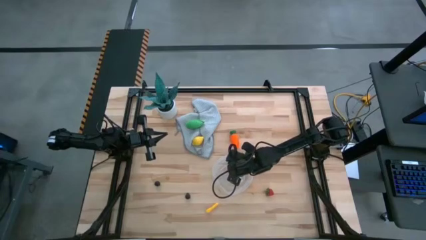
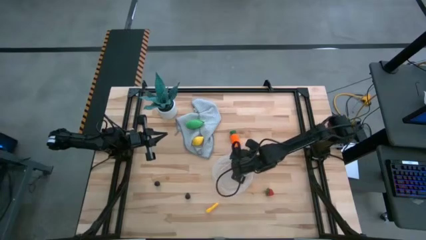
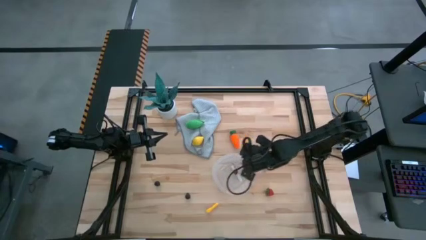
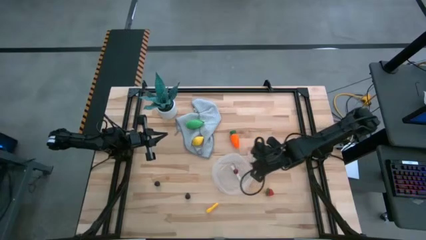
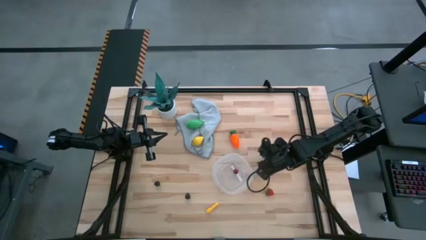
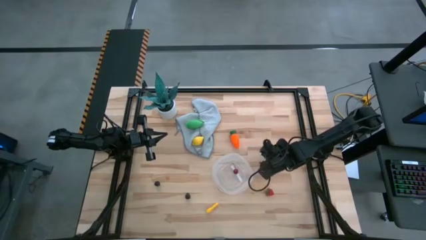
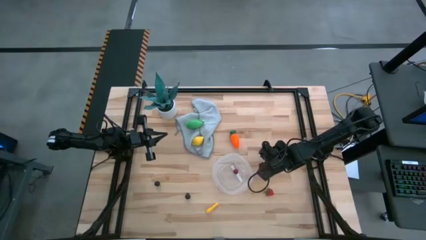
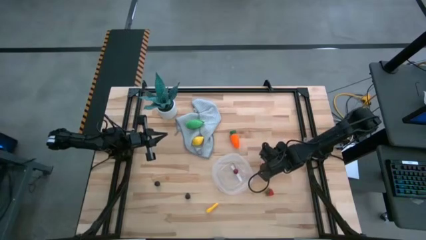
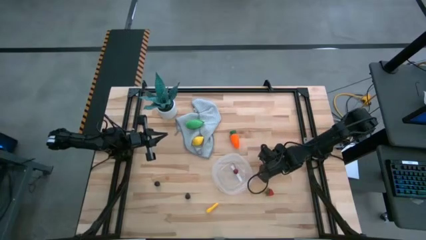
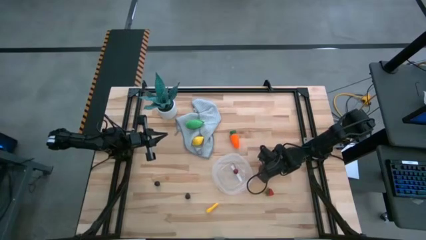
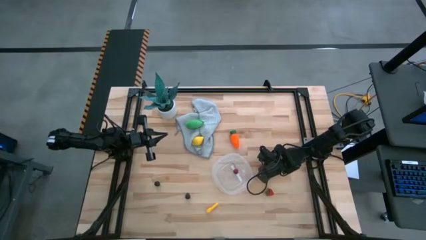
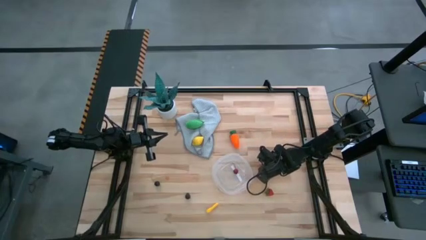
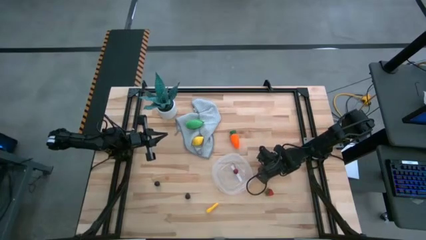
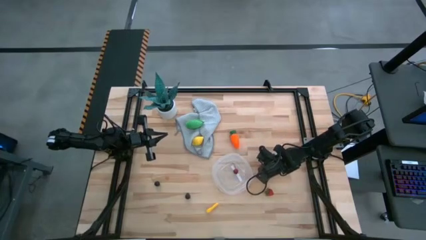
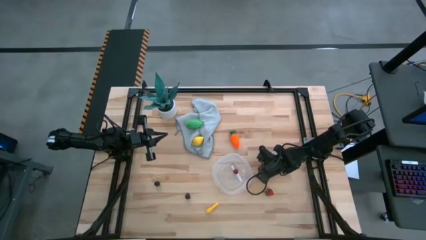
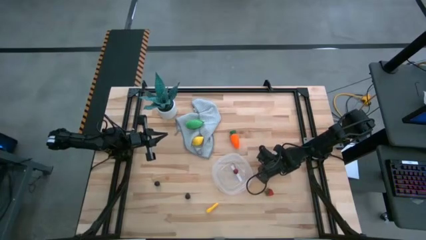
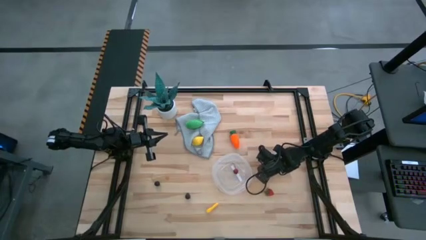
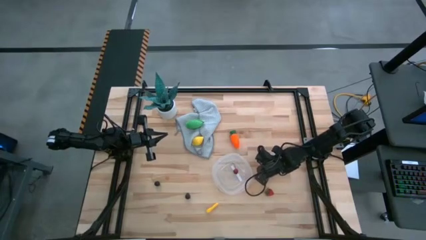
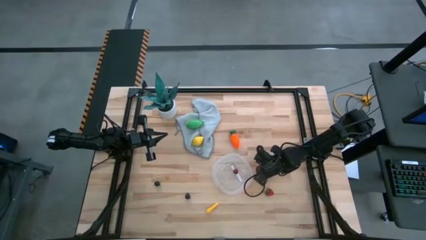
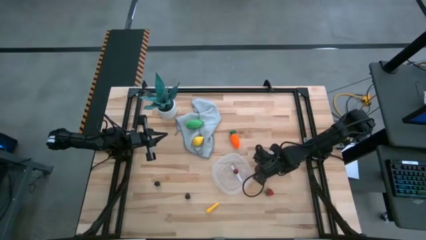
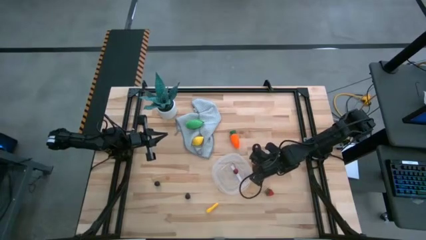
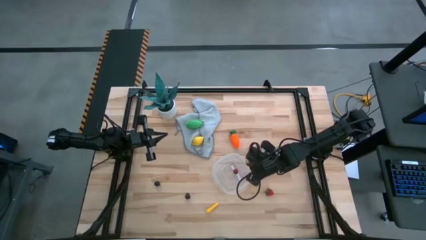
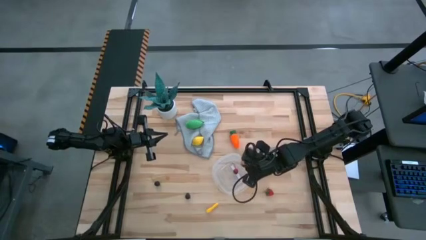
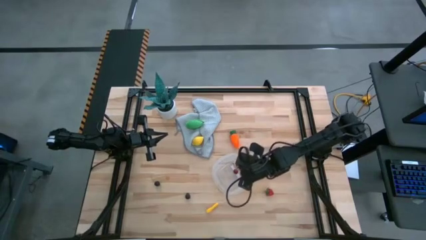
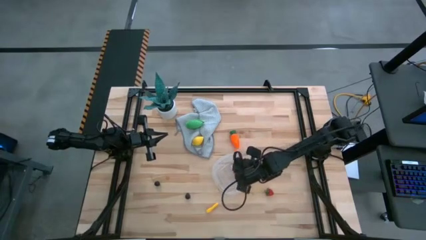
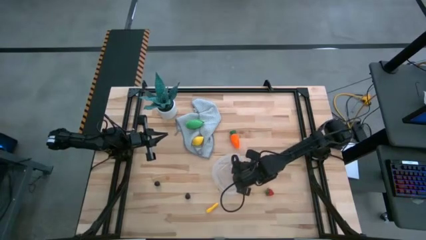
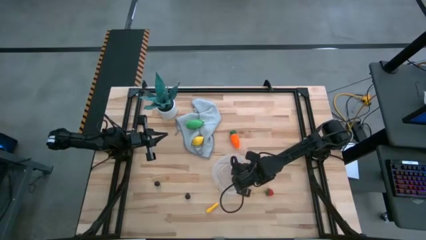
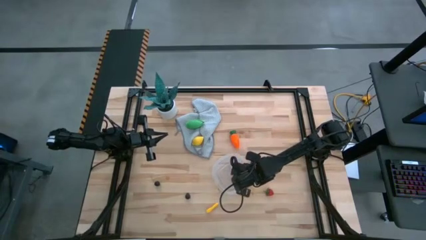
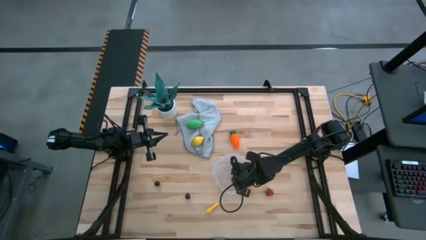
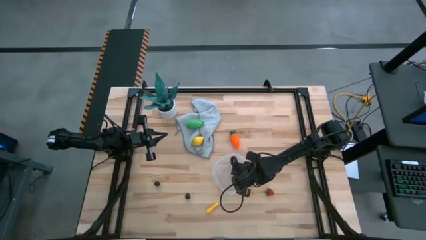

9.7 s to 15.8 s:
Task: Pick and placing Produce into tupperware
Put the peach into the transparent bin

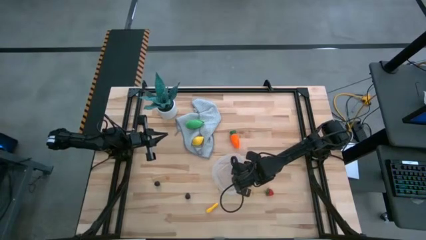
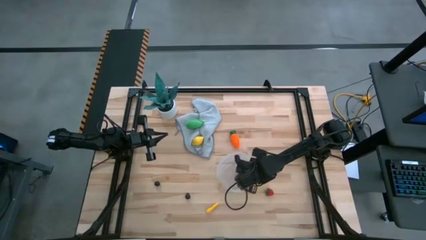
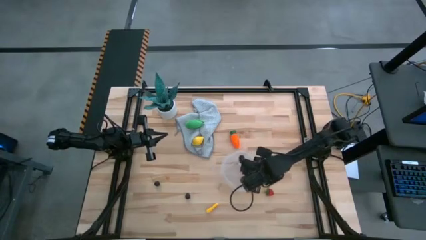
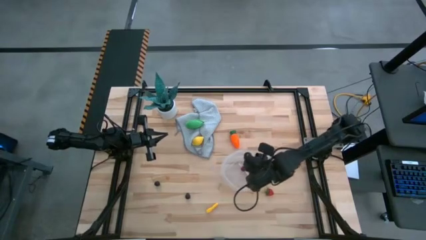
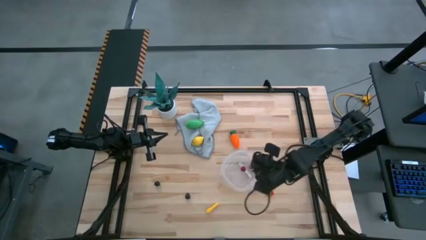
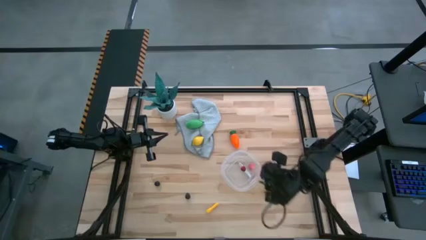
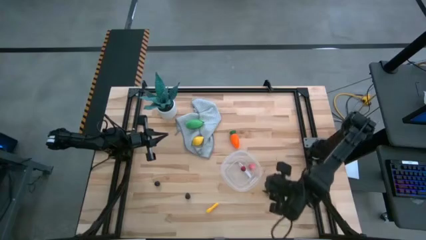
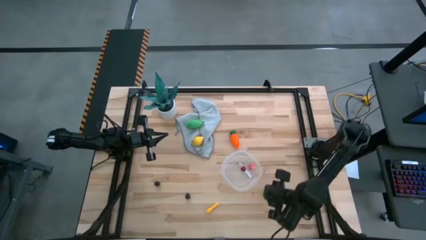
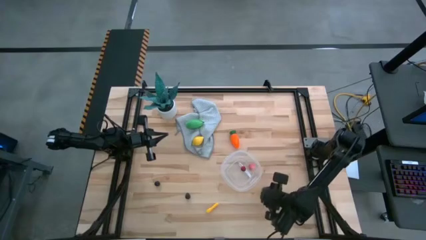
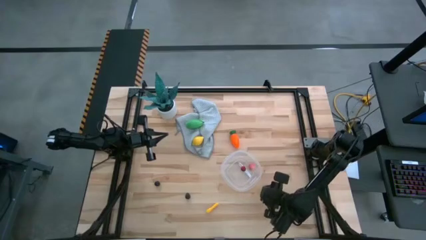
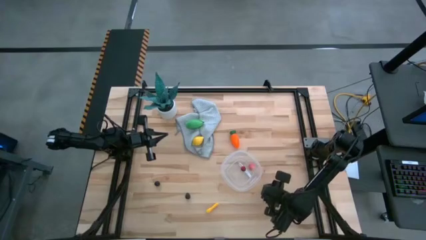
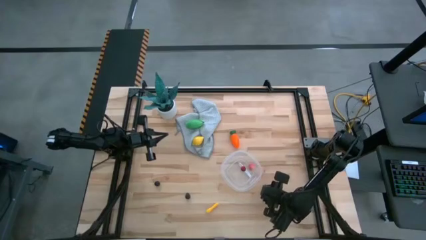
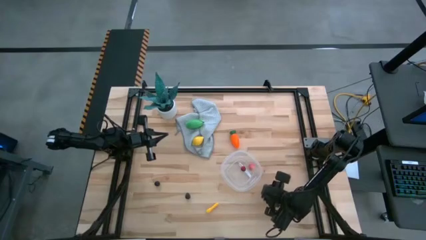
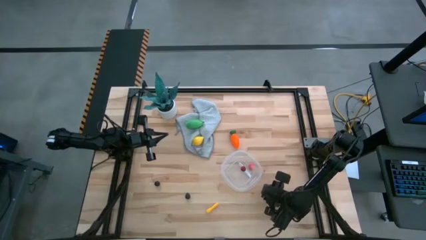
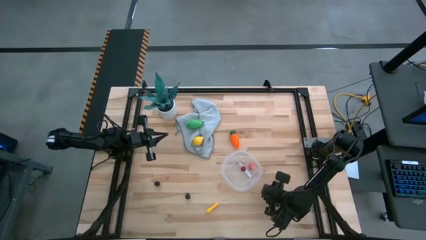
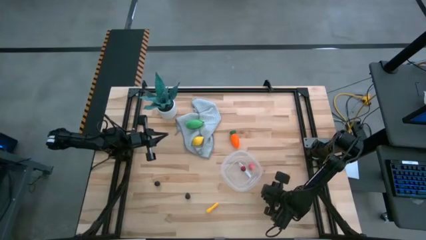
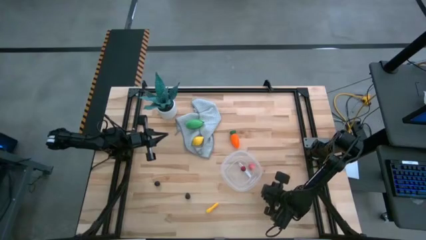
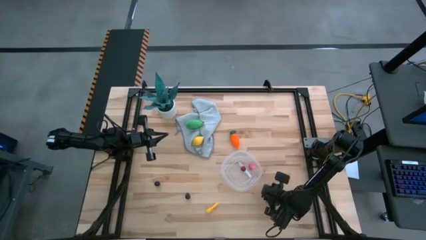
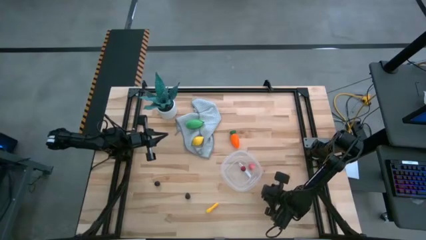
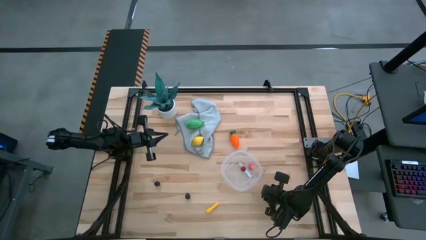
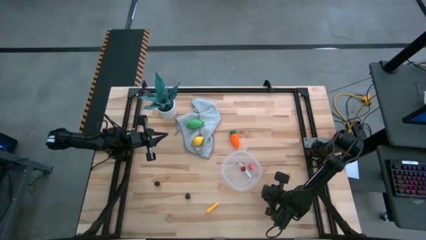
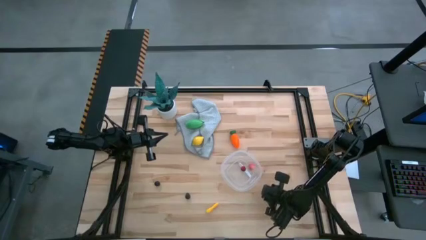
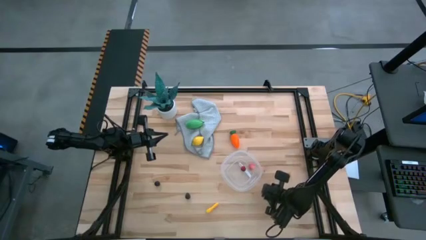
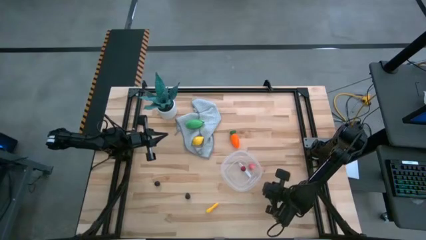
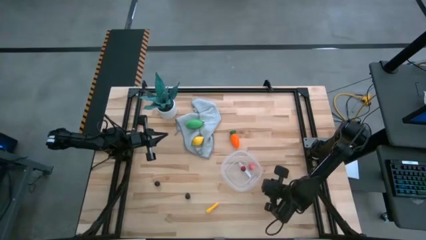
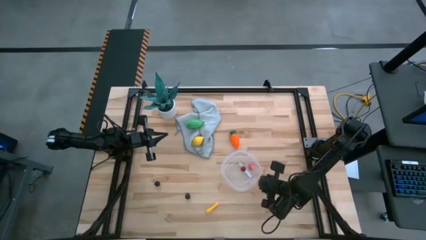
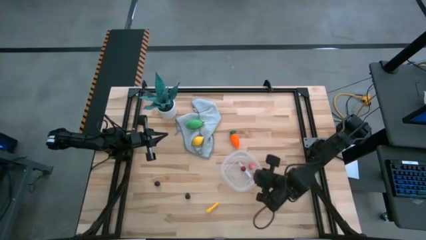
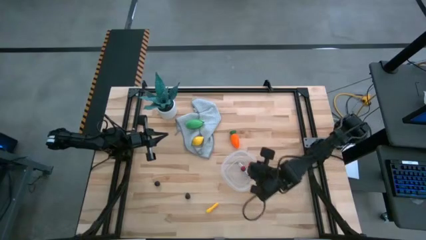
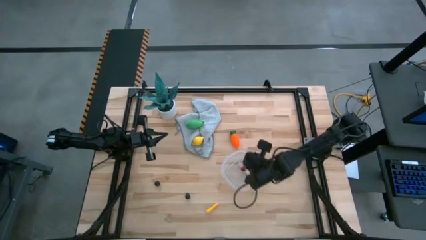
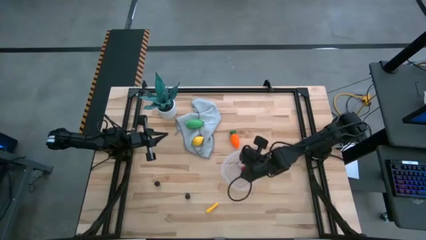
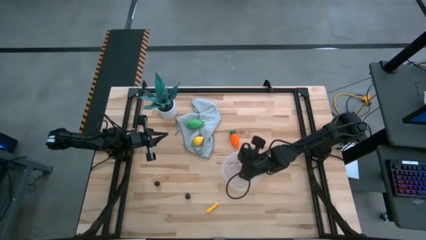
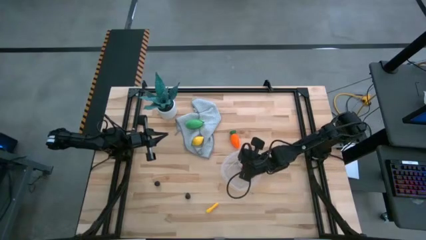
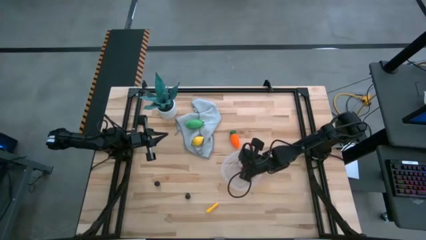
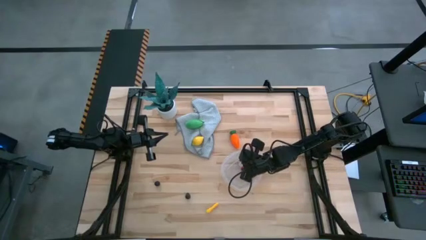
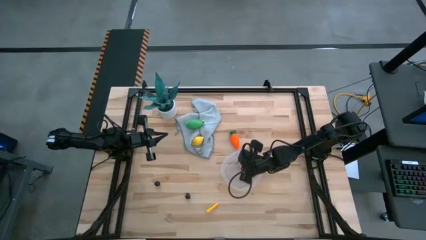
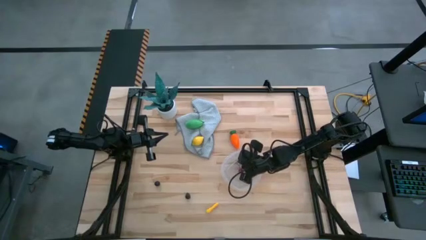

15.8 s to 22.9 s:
Put the strawberry into the transparent bin

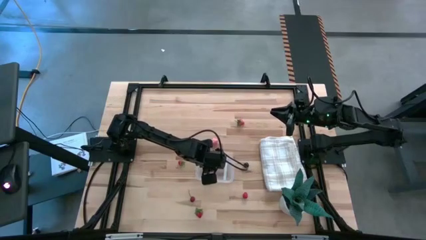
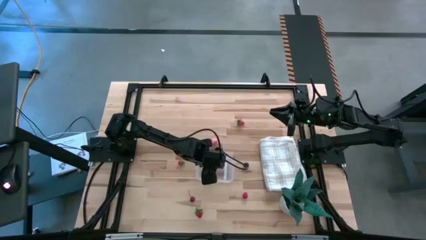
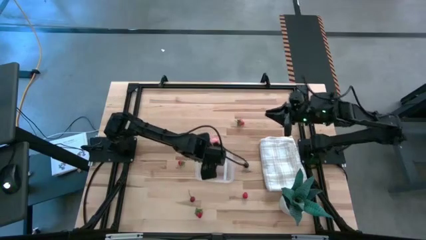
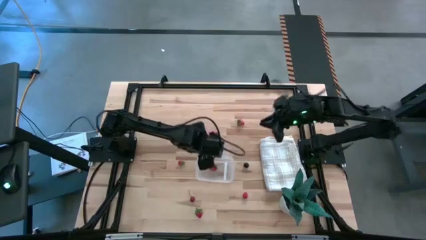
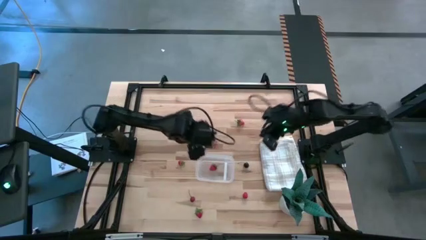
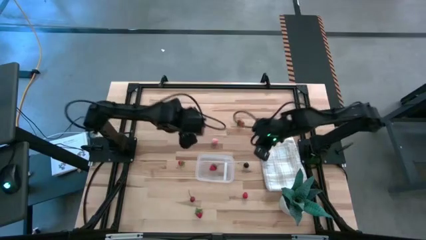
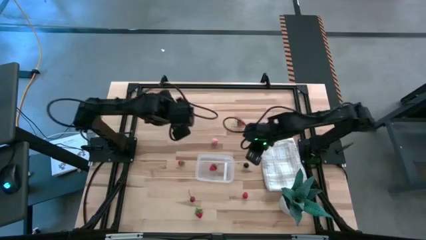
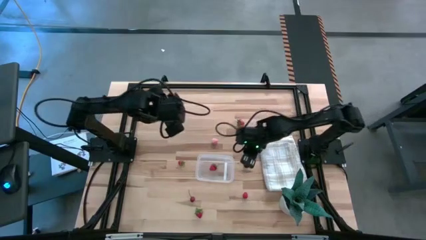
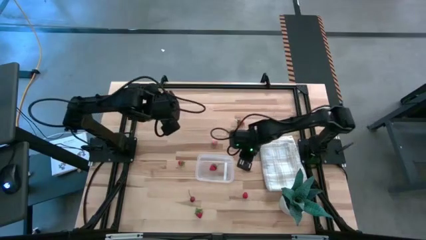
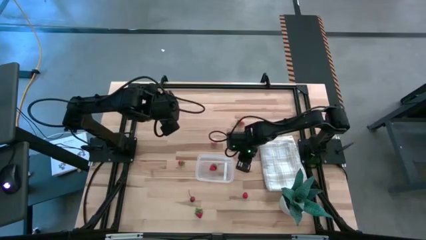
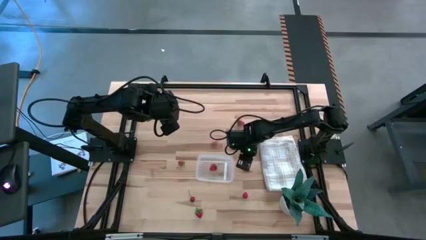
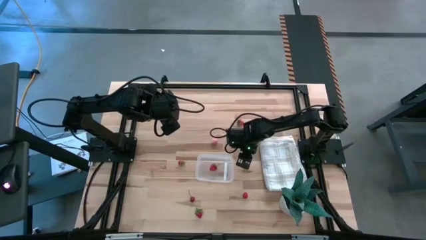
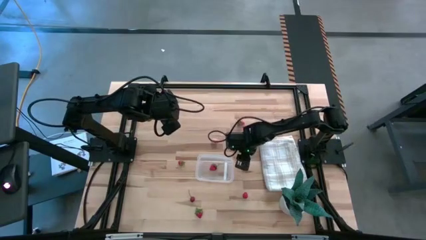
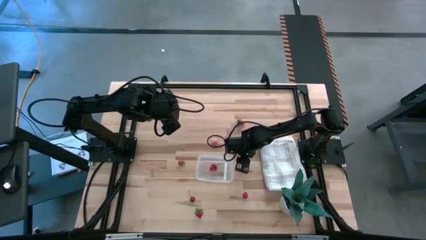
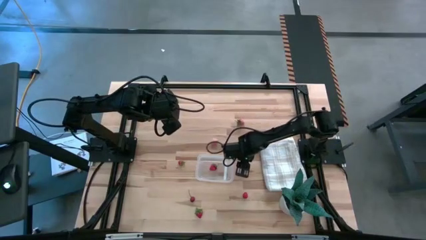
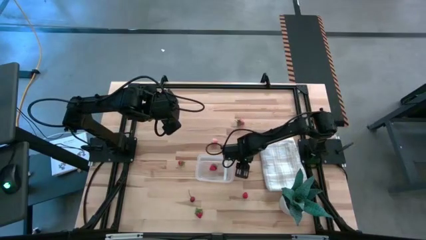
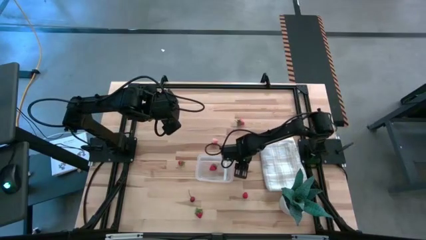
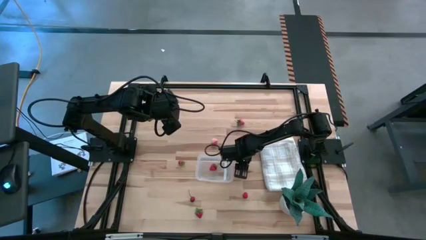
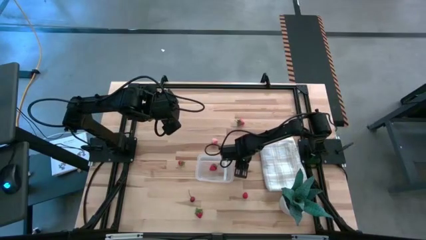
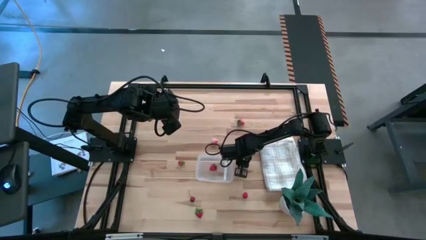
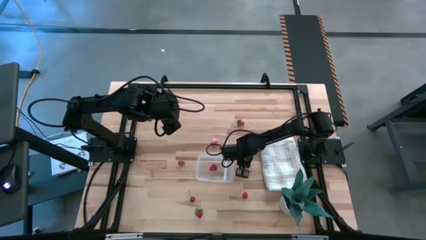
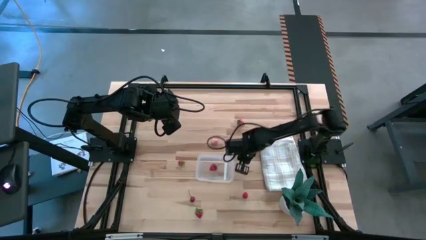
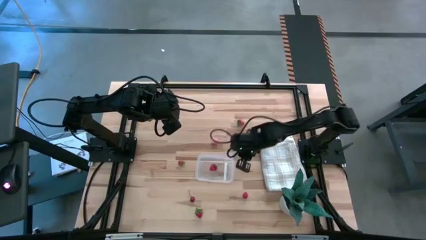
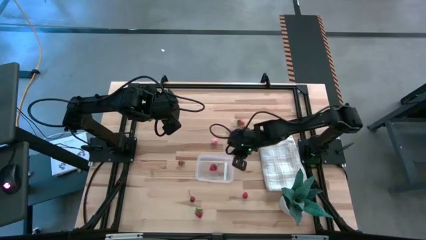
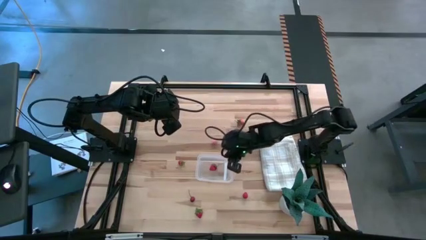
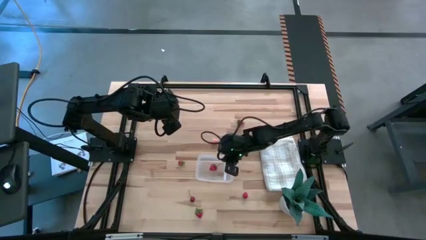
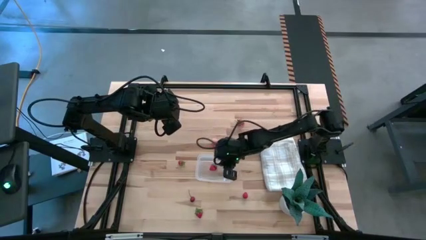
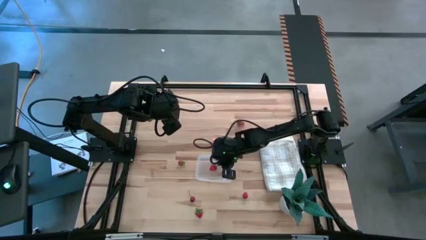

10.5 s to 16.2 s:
Task: Pick and placing Produce into tupperware
Put the black cherry into the bin
